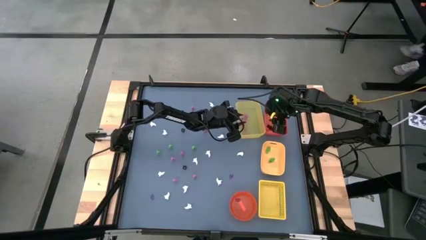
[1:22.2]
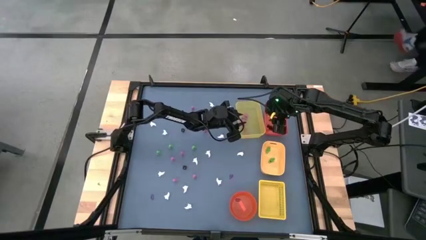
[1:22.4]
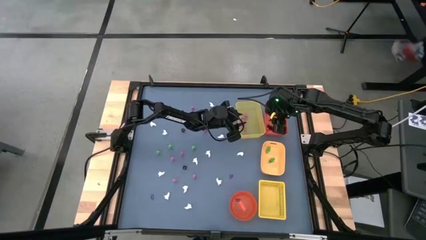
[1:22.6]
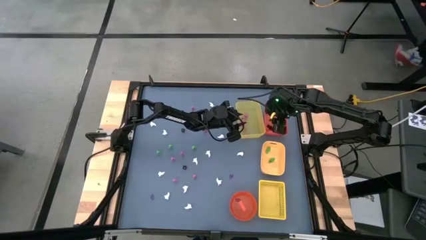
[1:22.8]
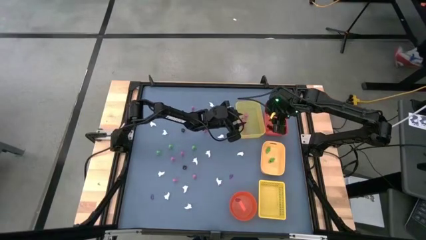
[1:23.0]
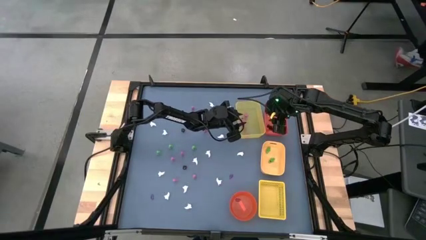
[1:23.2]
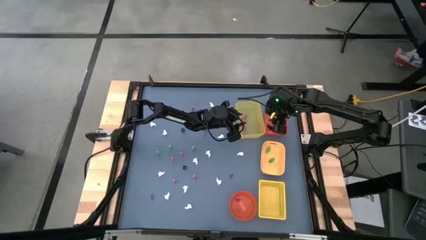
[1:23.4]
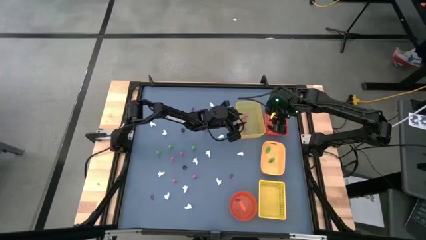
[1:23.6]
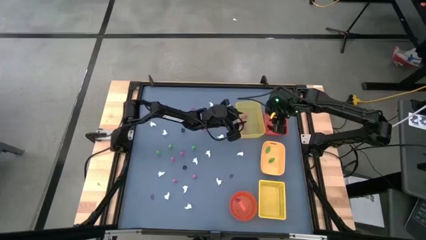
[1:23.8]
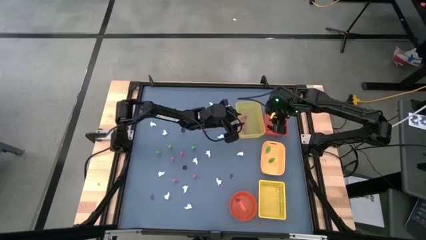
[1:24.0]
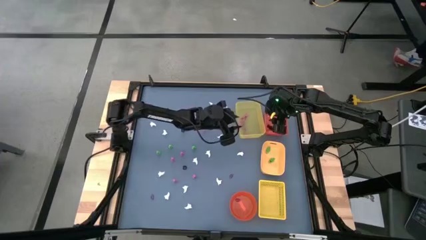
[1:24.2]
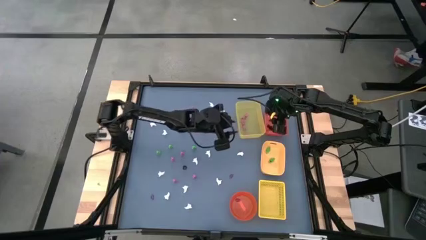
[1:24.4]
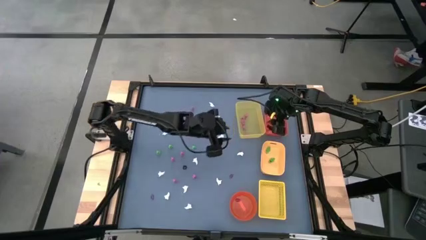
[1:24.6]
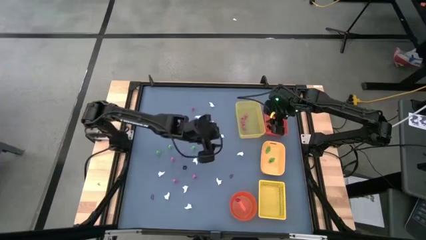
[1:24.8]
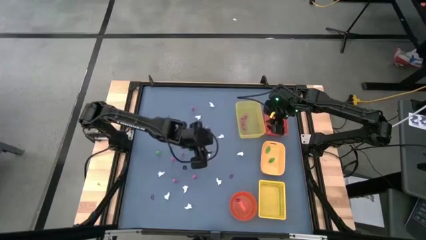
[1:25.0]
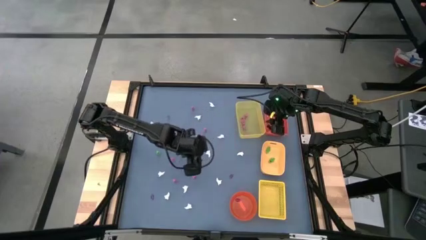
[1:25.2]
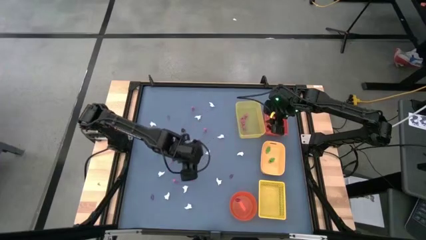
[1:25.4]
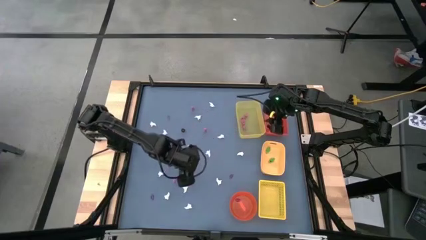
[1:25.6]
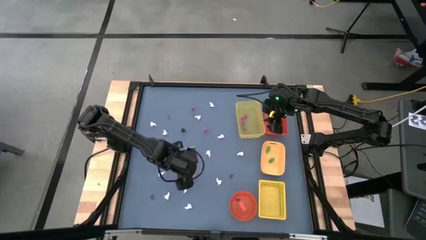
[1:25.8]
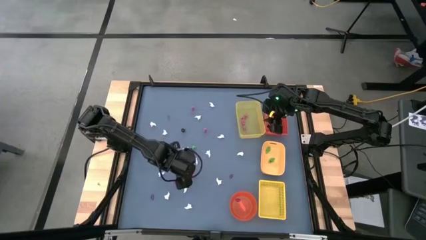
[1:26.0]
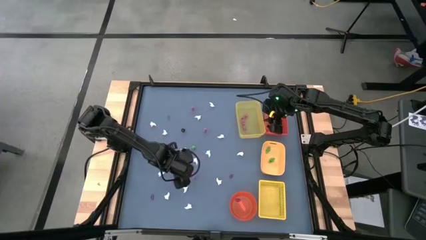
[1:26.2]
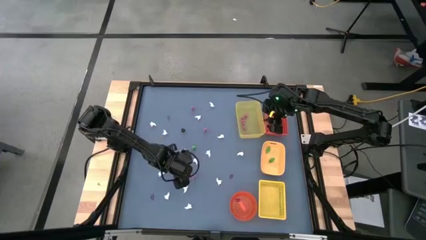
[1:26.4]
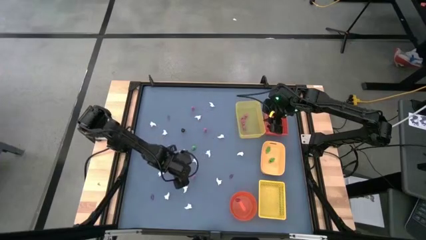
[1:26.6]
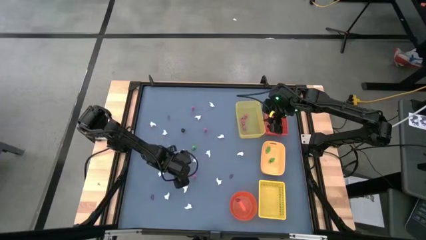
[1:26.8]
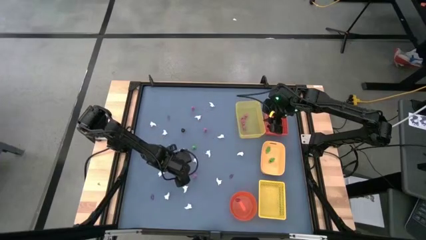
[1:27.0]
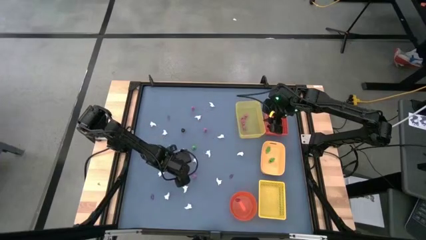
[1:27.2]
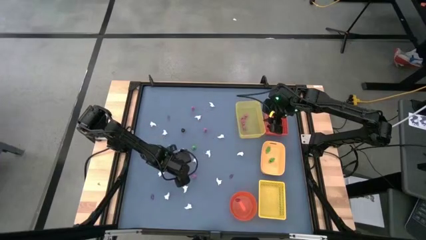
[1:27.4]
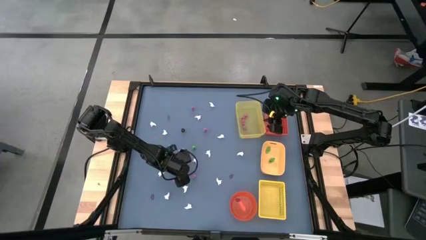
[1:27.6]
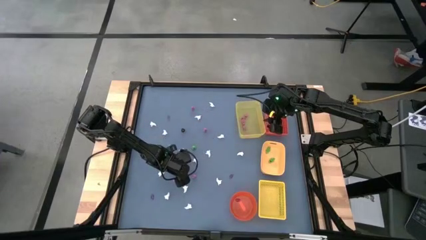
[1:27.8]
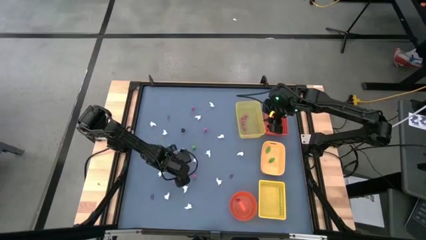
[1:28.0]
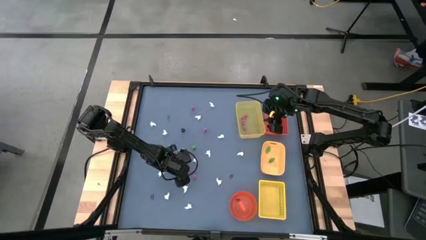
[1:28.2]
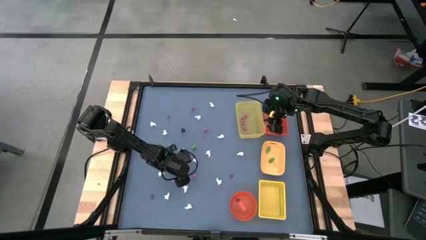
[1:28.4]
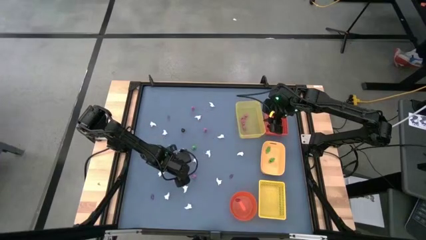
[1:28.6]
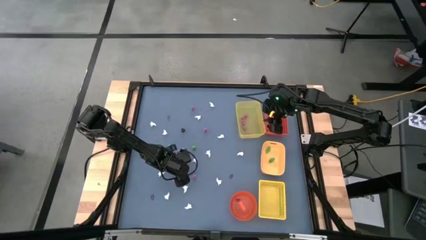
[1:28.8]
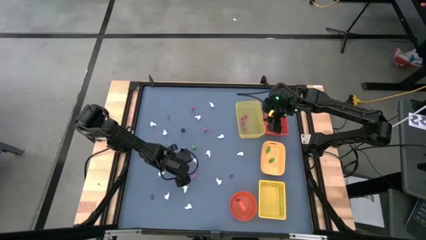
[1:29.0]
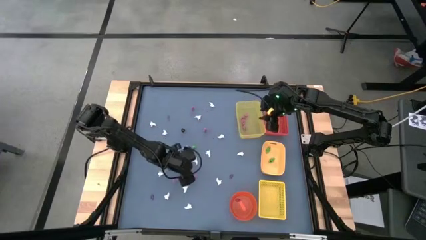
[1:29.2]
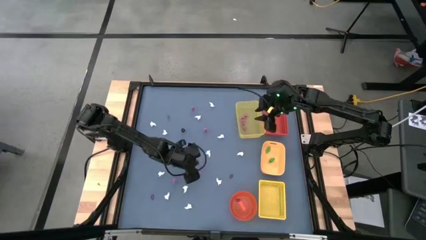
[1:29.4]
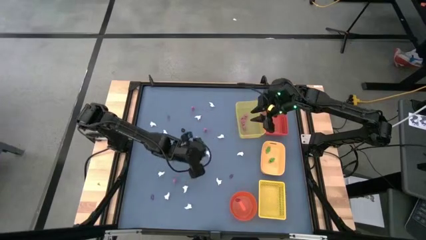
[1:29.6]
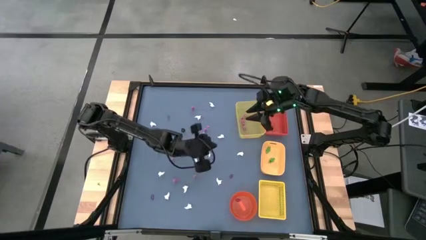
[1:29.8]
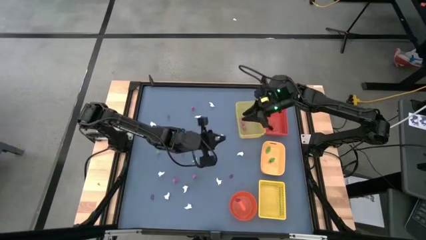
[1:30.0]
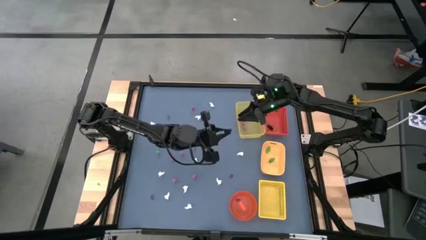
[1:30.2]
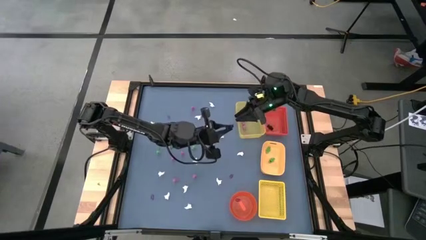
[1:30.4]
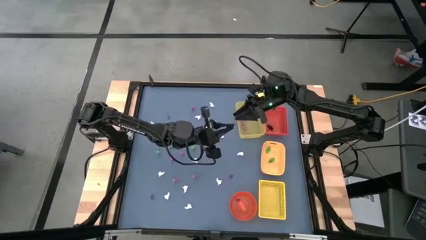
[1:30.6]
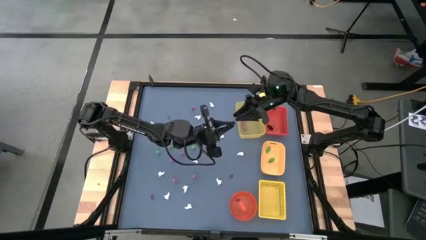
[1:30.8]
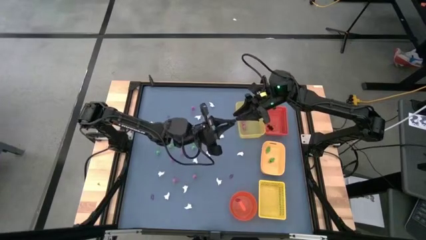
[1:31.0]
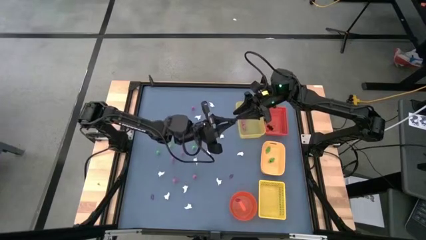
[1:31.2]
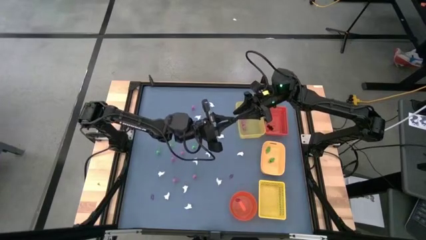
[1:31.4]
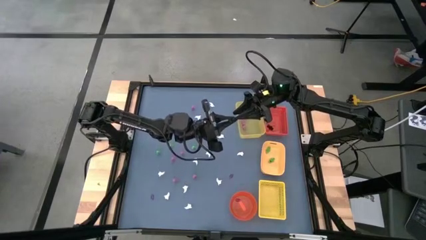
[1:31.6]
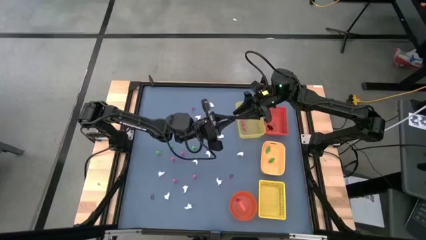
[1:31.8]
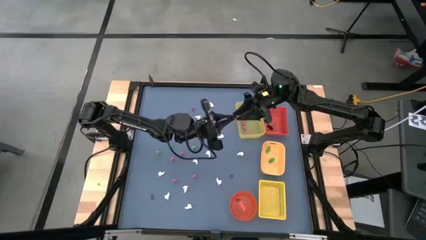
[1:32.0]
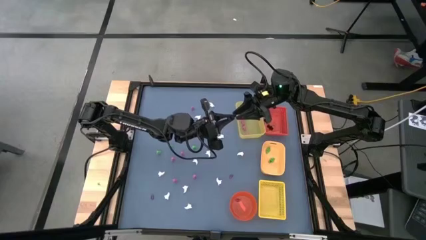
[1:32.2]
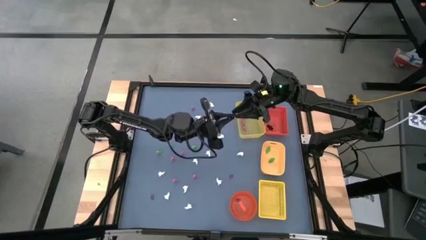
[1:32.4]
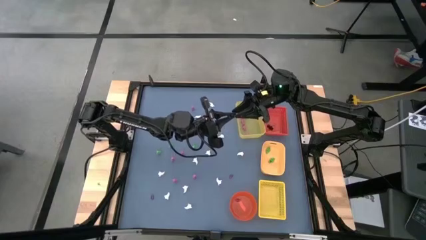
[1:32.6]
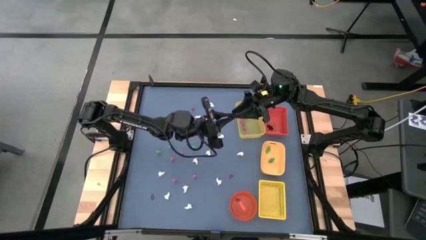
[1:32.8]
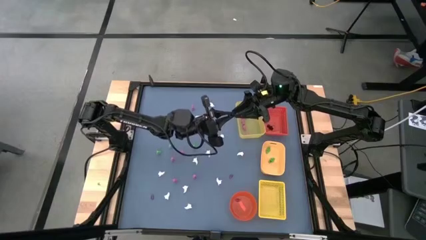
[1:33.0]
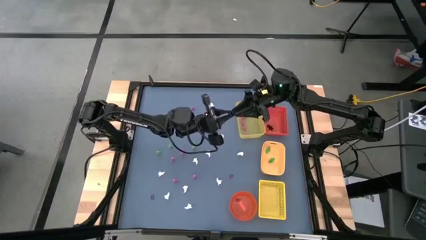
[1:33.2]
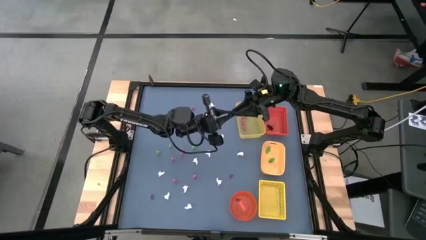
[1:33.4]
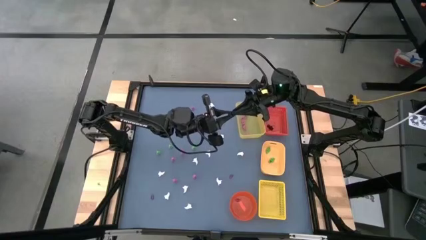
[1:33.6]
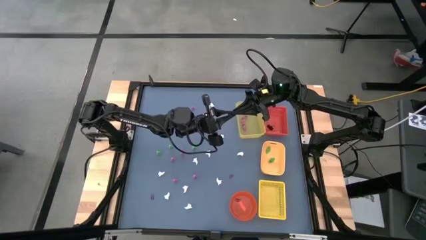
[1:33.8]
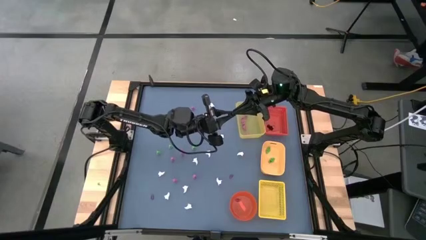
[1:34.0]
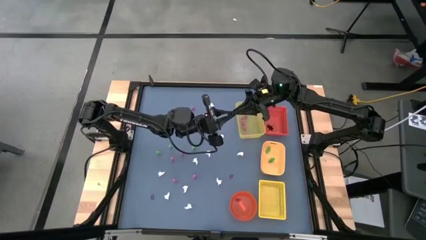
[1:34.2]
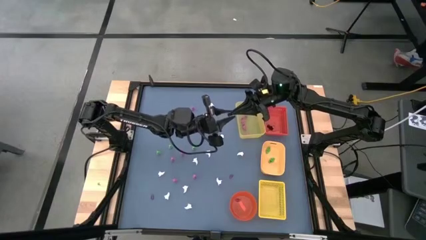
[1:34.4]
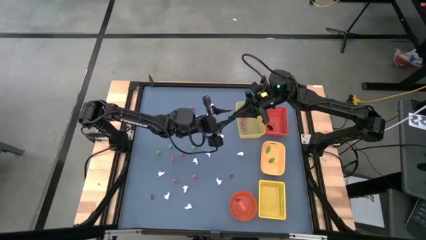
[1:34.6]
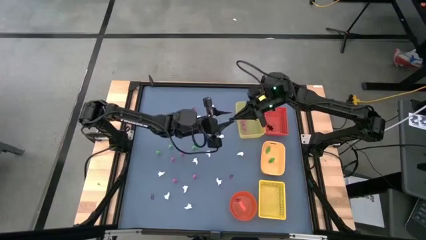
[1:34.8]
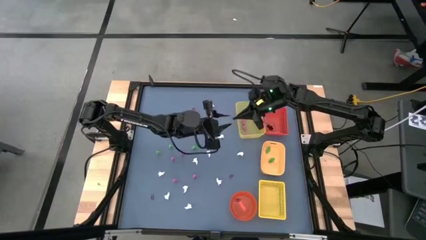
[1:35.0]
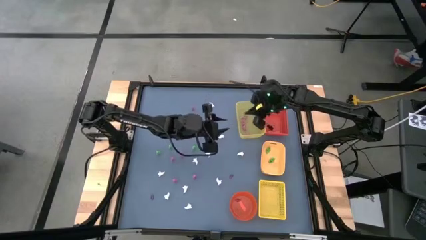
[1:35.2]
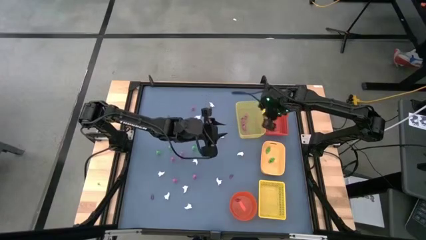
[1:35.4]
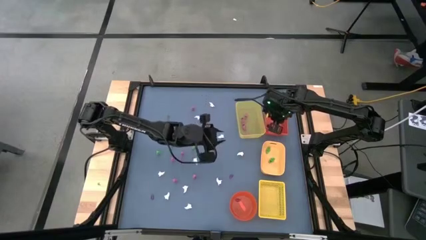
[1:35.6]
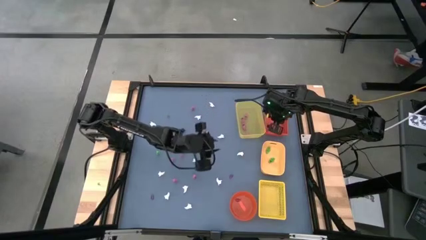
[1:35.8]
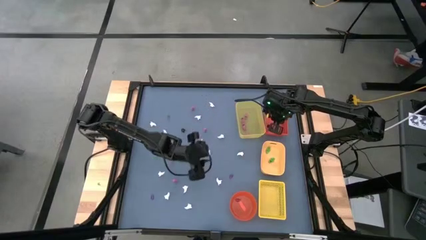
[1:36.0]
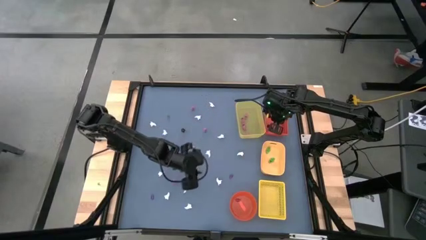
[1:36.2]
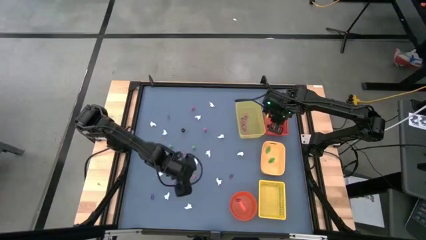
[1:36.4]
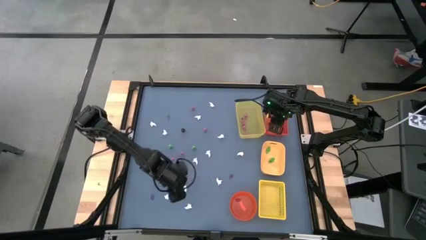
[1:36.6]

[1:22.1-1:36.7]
Task: Sort Halloween decoration
Put the black skeleton toy into the red box
